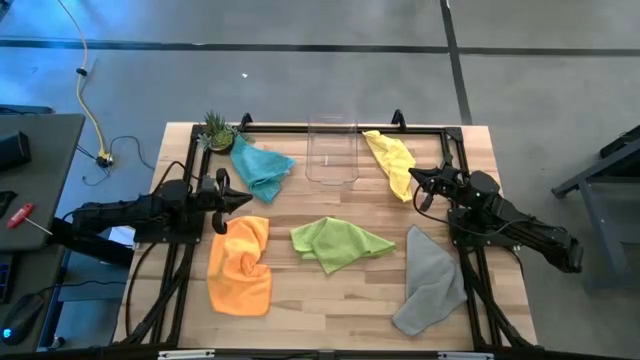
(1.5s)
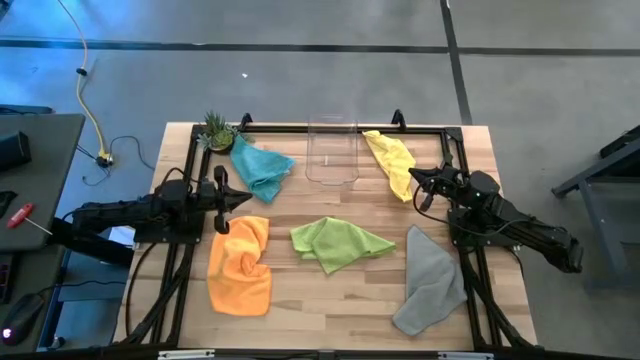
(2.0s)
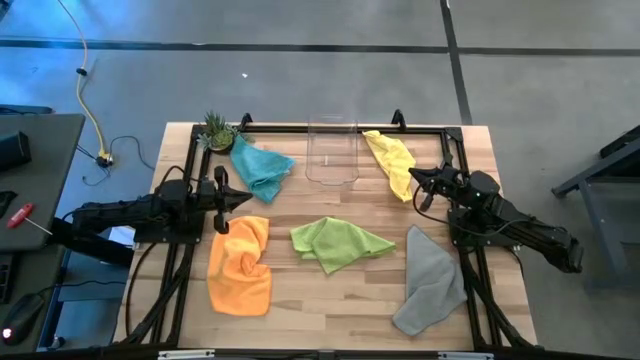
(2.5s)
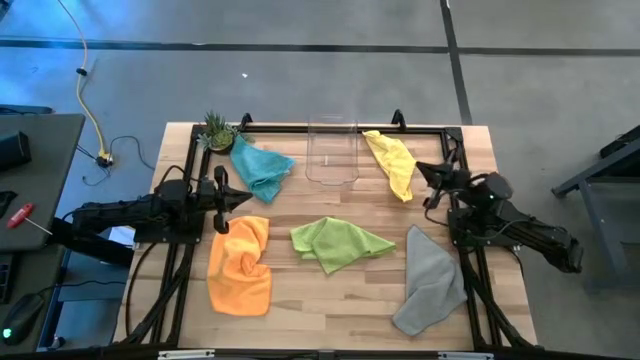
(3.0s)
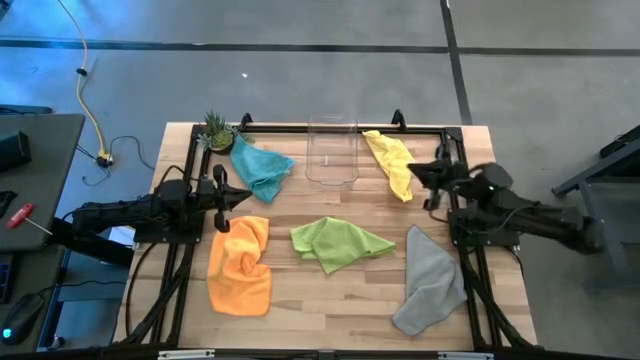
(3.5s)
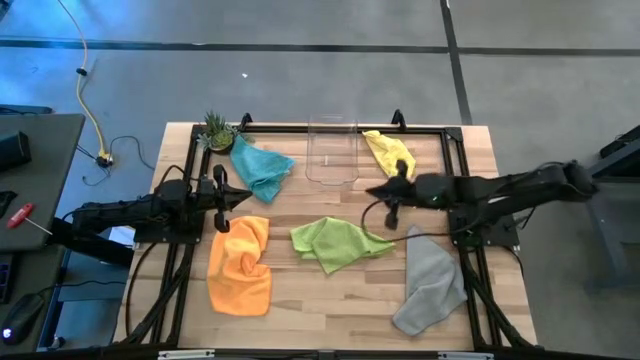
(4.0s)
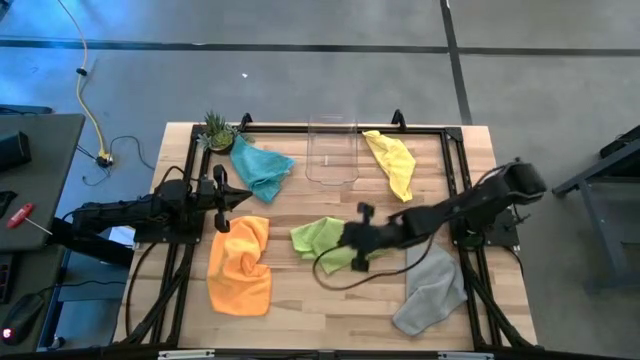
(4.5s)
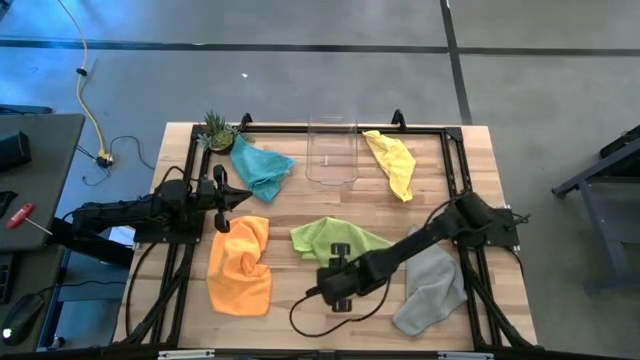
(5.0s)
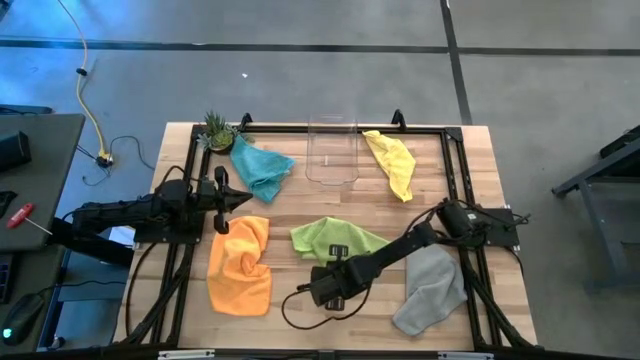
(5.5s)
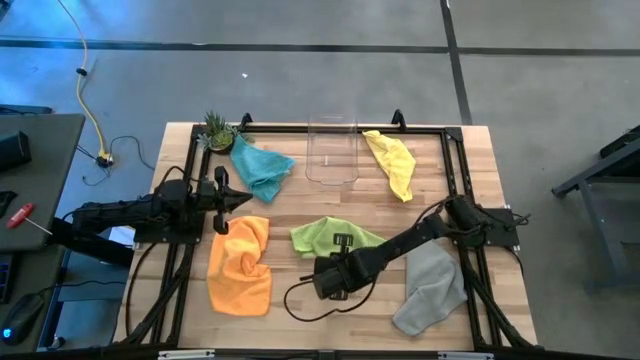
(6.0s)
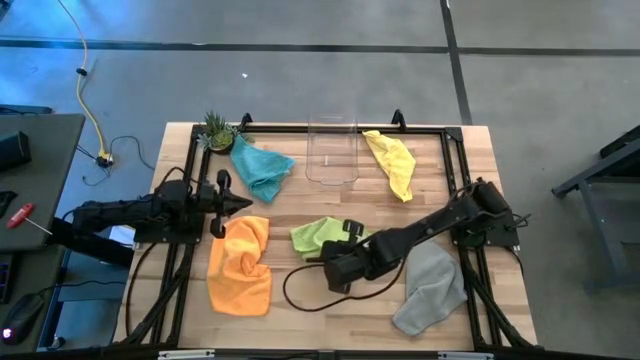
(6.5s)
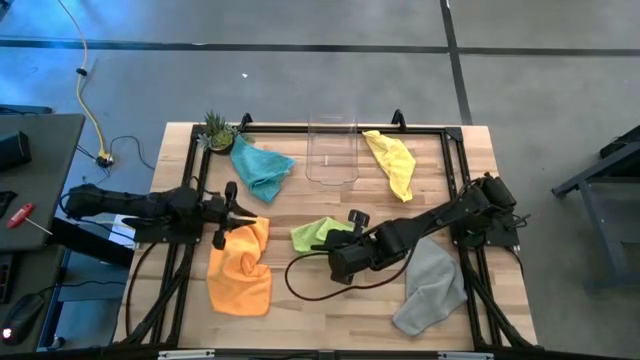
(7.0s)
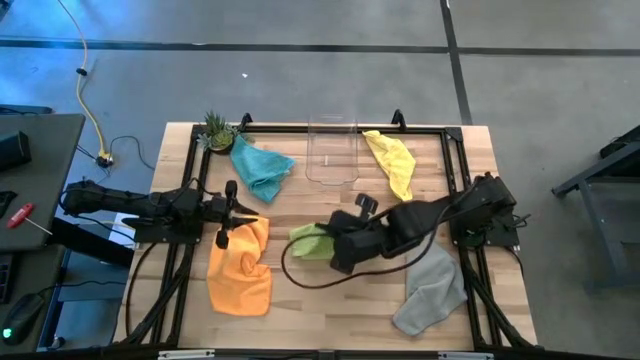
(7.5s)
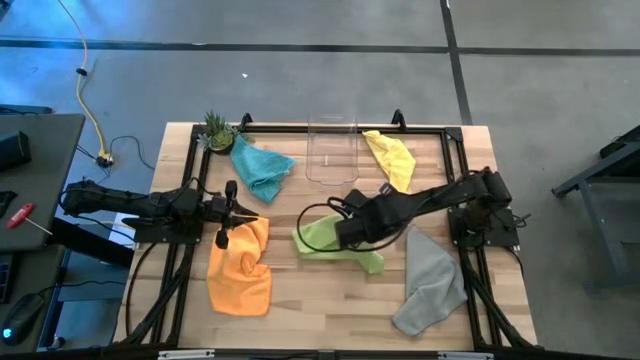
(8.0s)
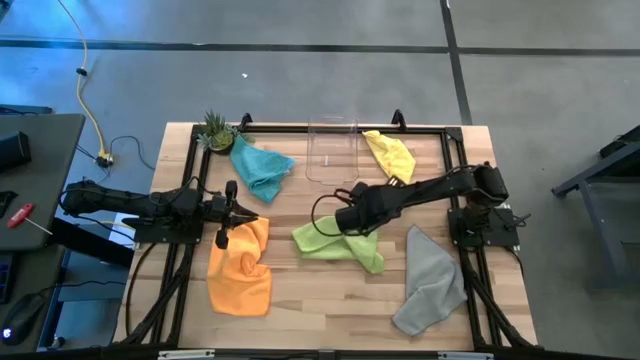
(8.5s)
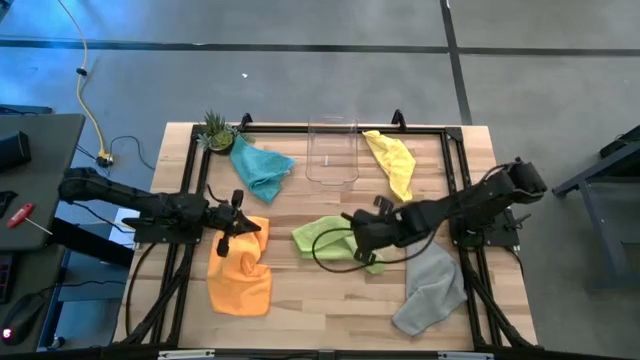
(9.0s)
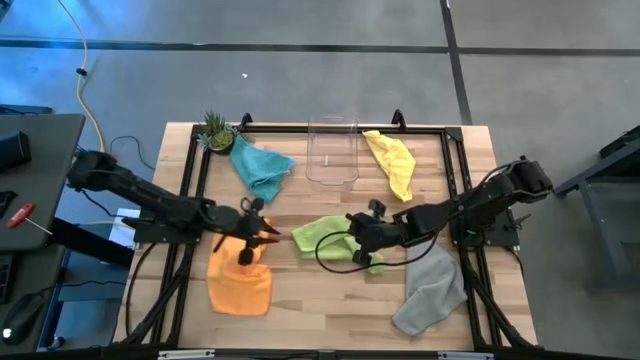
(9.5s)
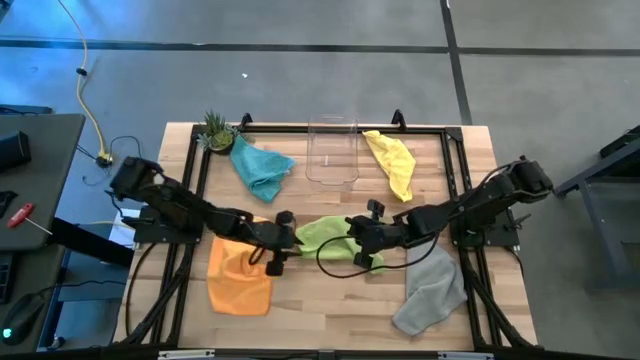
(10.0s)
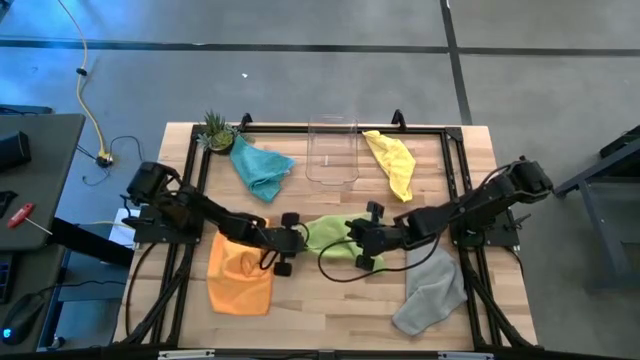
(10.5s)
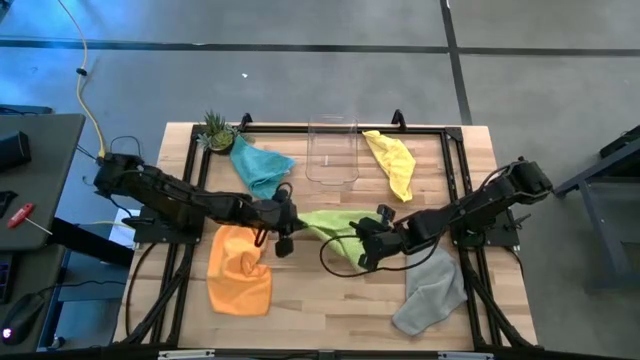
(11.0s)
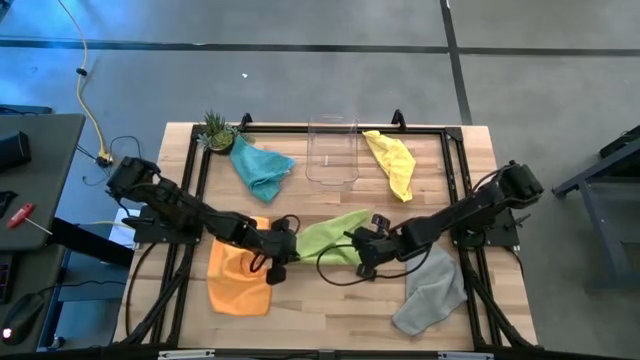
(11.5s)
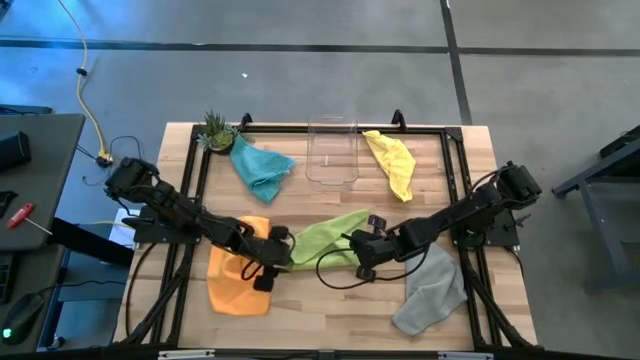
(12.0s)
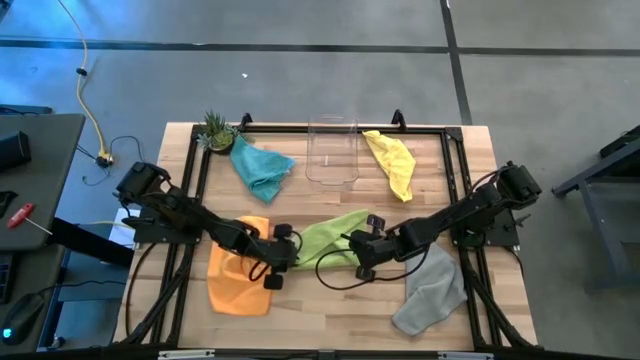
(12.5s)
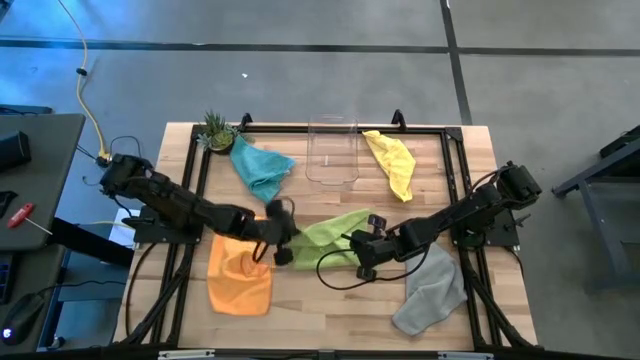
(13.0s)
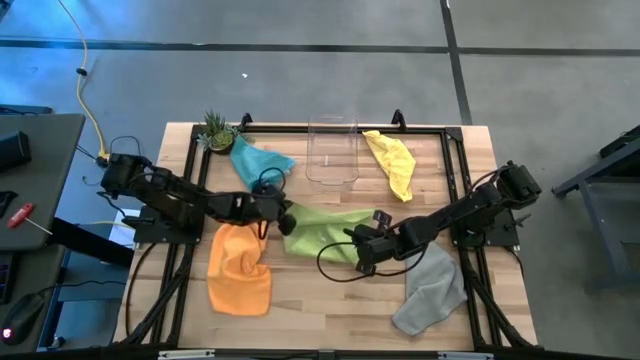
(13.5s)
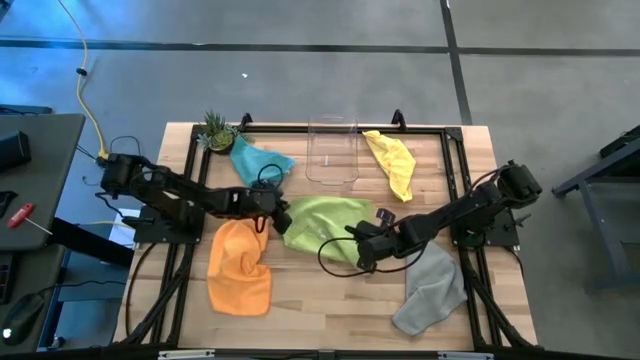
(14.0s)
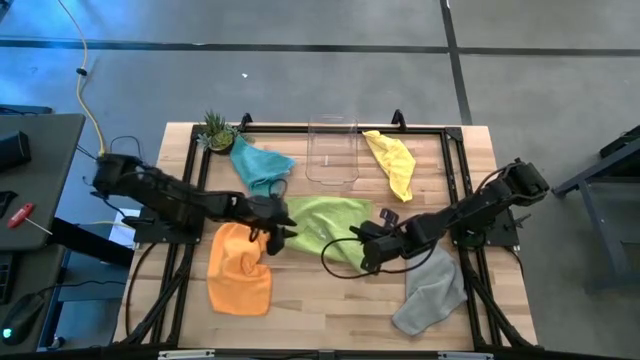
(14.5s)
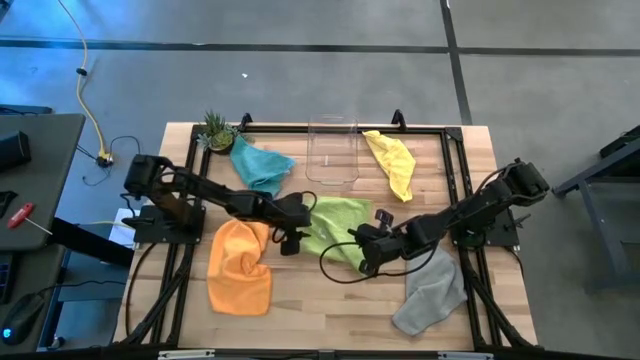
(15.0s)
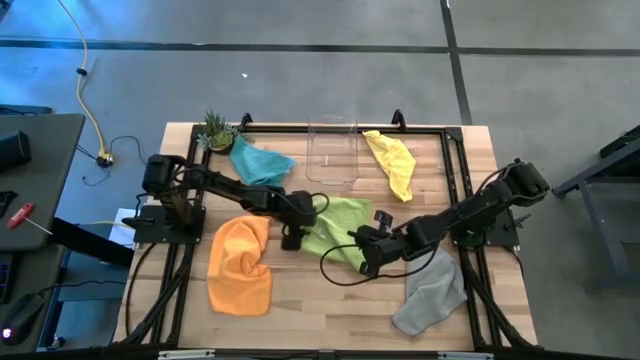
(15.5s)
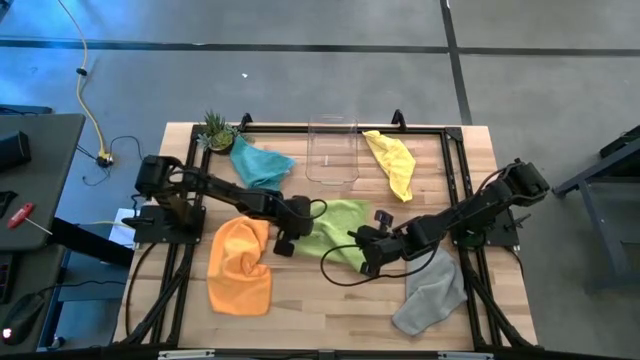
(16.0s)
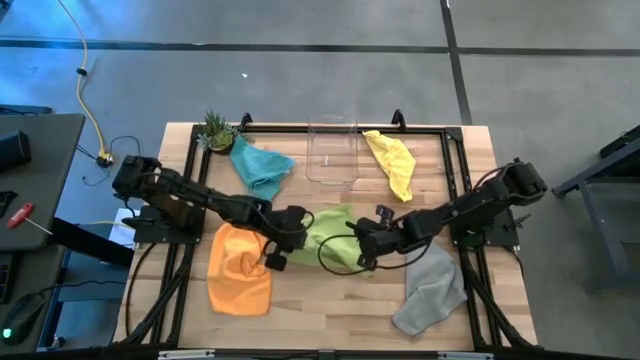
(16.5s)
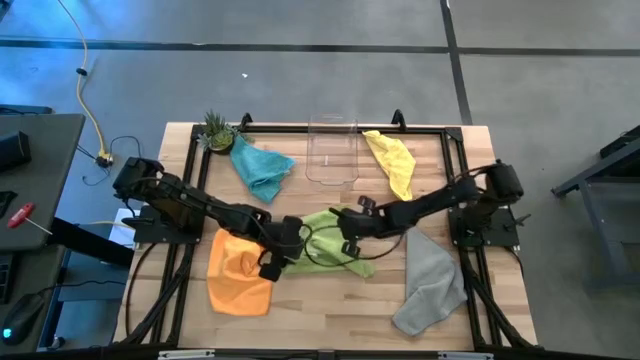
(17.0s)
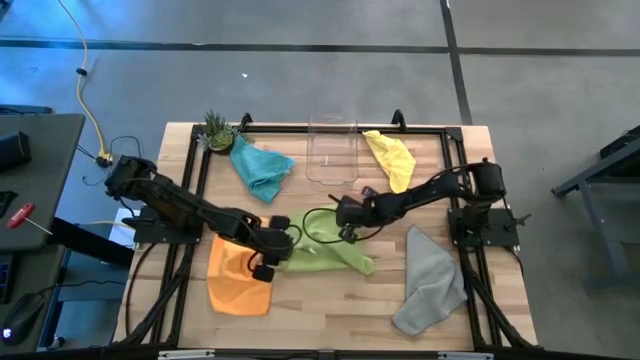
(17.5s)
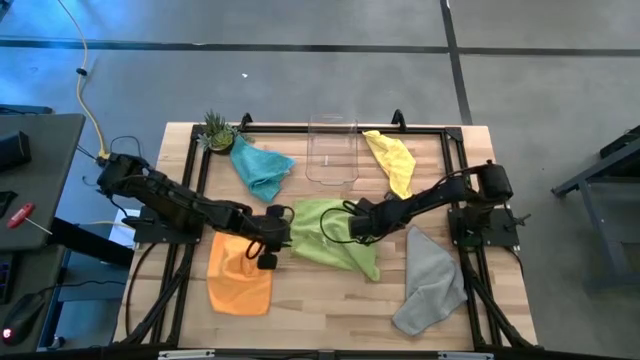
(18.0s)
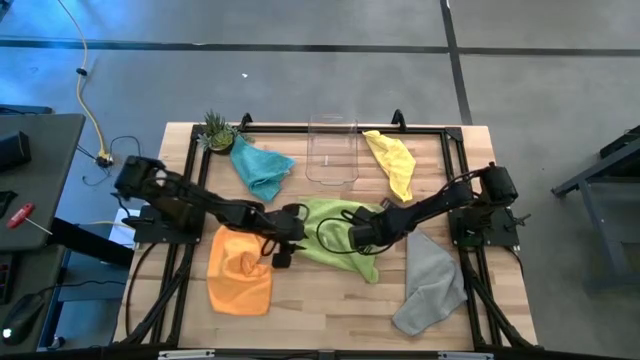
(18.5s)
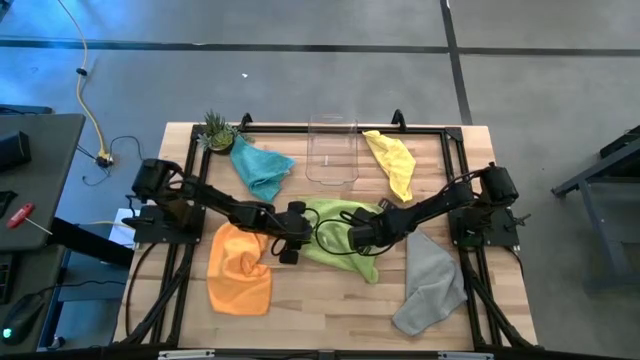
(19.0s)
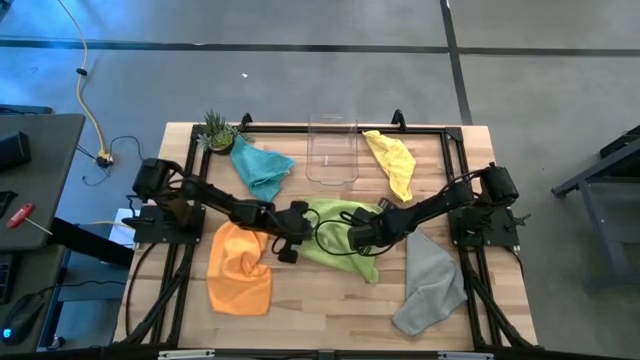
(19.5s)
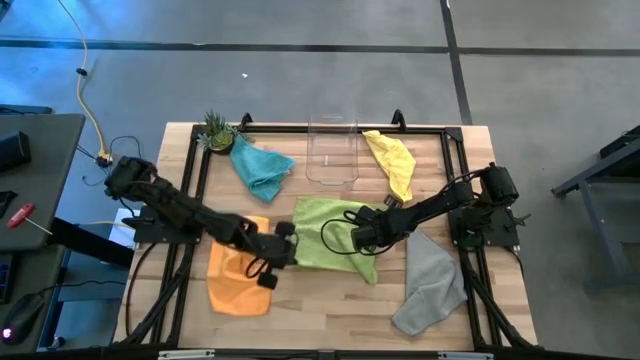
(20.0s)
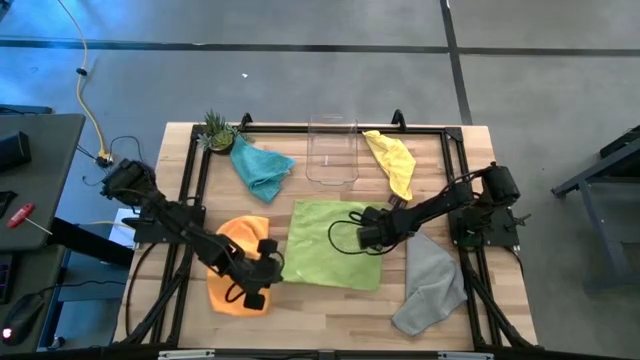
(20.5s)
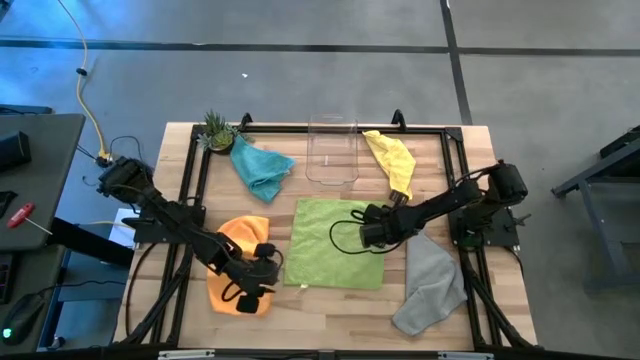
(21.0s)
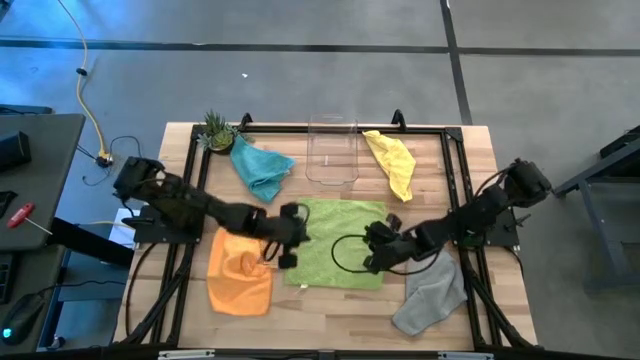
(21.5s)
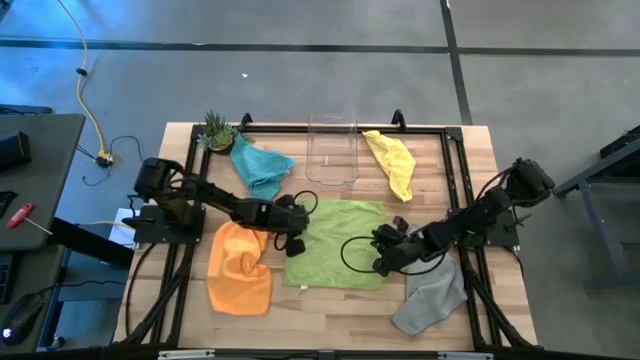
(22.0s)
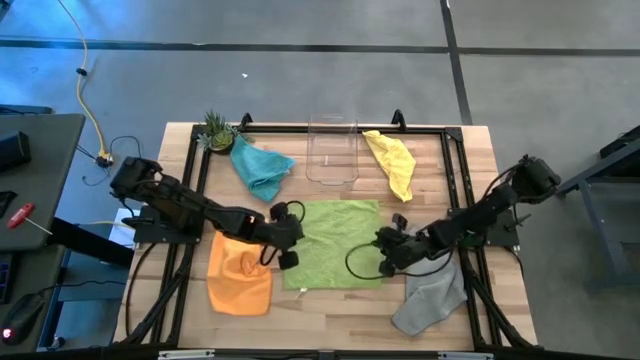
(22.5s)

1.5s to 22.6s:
Task: Fold microfiber towels
Fold the green microfiber cloth
